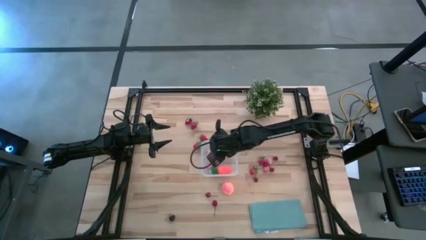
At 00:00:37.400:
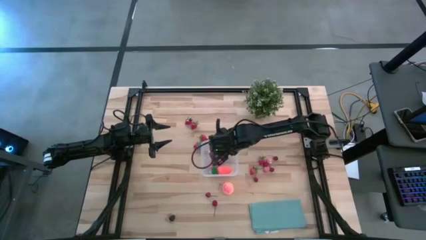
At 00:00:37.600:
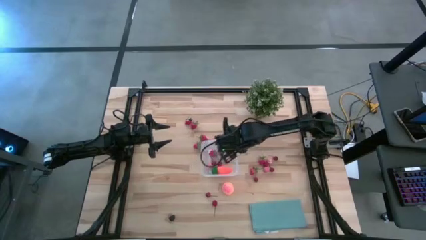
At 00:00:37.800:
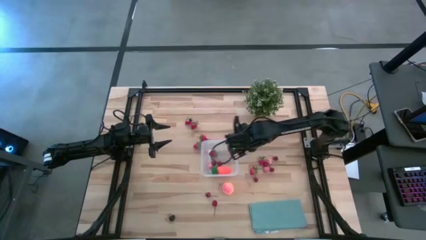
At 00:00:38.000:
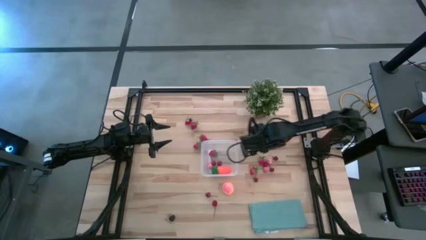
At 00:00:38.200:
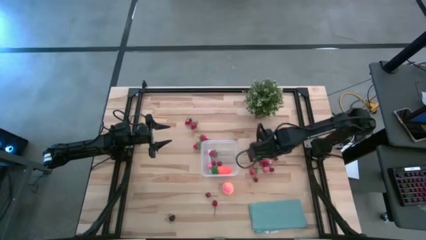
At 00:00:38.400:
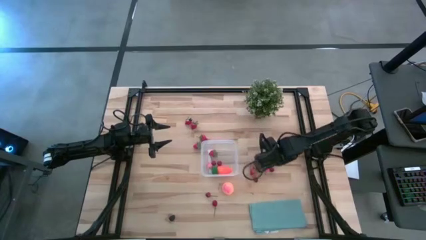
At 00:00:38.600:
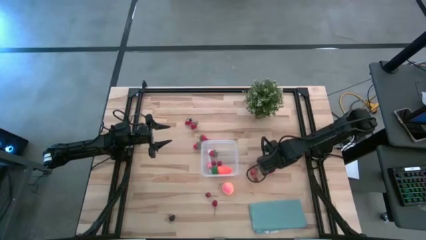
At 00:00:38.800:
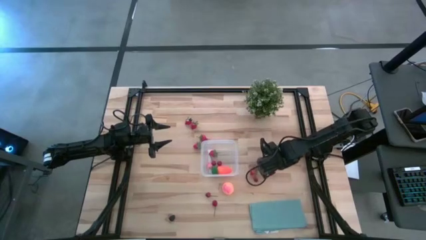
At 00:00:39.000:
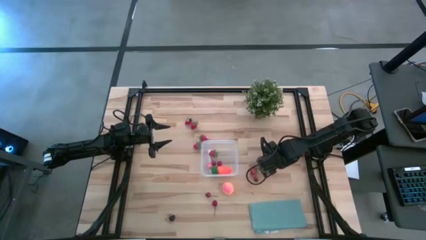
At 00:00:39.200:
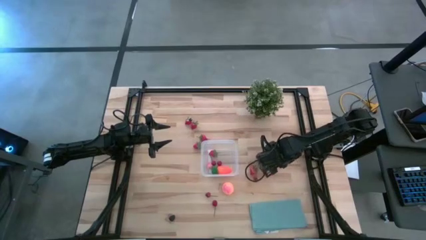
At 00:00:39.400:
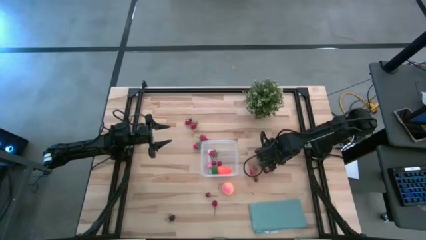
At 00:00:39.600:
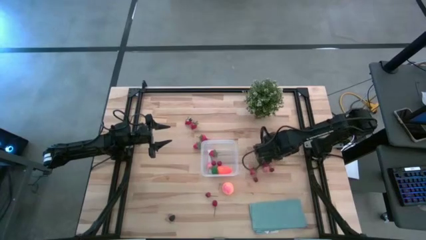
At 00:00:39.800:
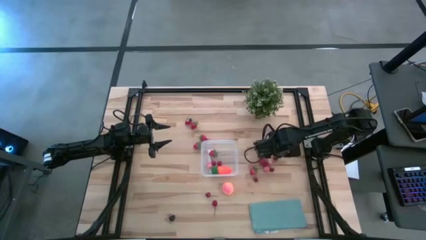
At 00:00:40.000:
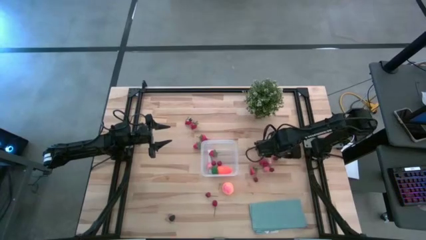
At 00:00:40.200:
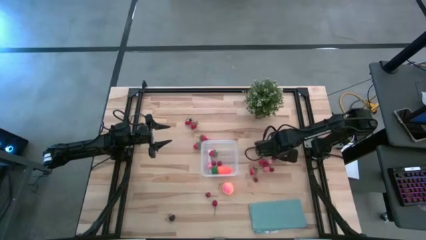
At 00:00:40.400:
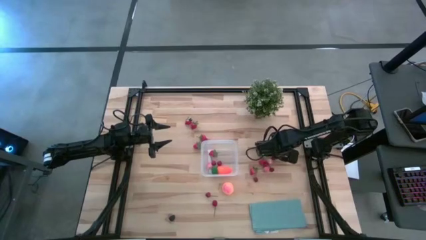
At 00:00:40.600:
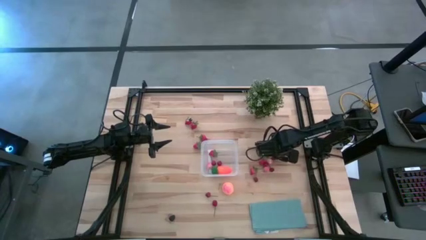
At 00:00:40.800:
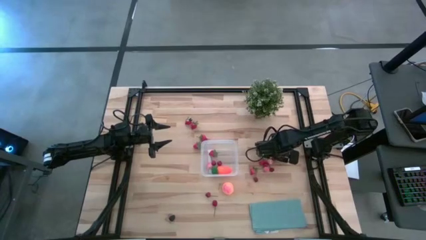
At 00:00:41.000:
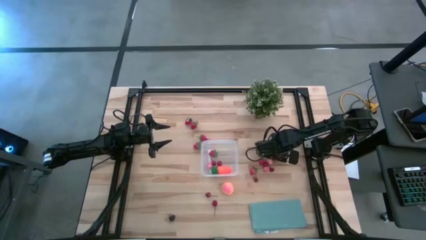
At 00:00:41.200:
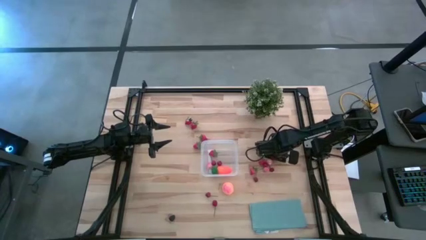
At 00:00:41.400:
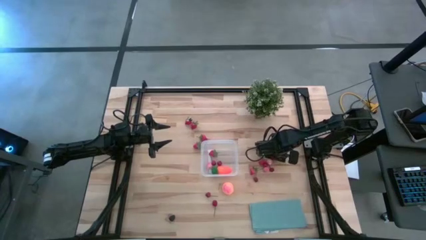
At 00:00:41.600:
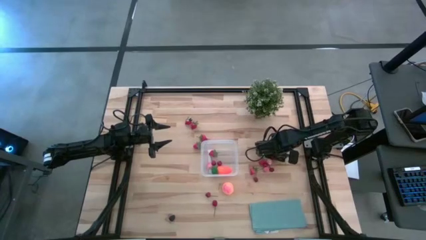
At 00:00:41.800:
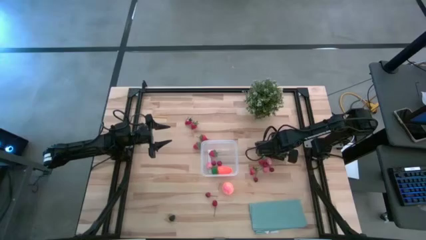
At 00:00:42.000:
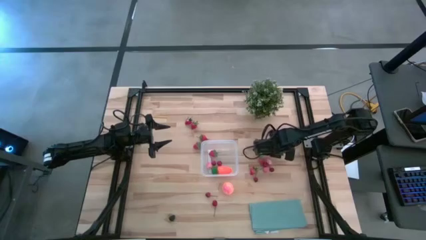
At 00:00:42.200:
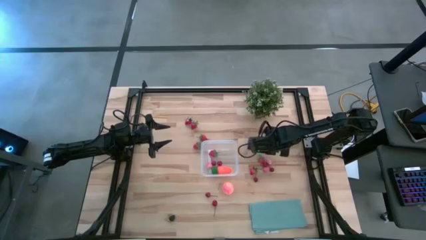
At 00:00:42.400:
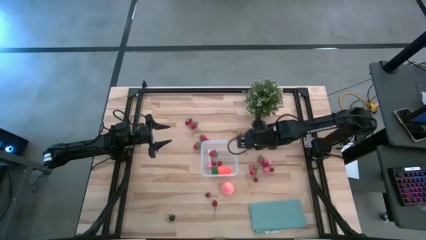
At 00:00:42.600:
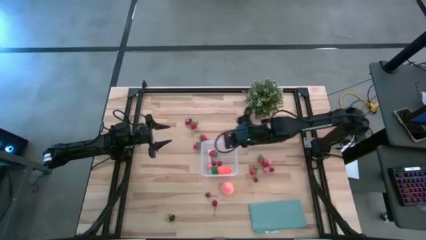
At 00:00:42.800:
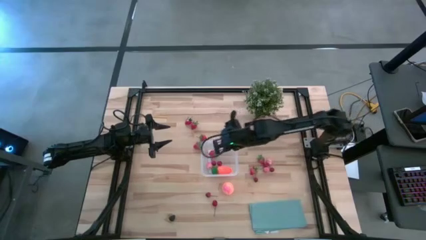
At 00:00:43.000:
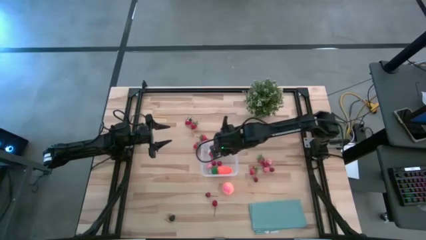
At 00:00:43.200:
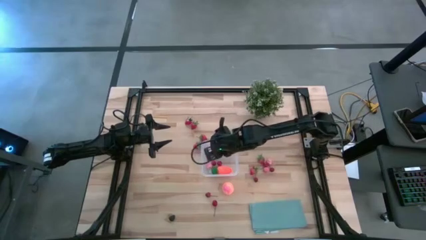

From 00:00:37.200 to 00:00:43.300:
Task: Pick and placing Produce into tupperware
Put the cherry into the transparent bin

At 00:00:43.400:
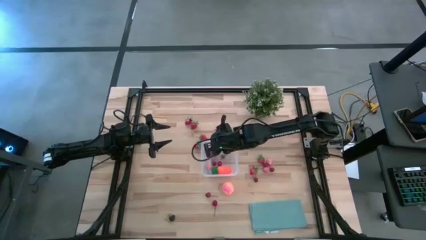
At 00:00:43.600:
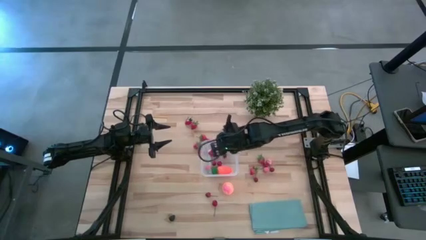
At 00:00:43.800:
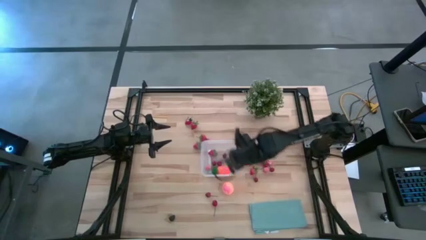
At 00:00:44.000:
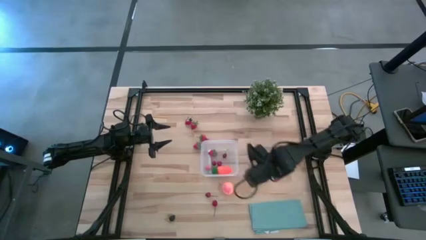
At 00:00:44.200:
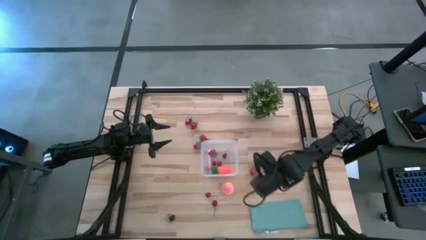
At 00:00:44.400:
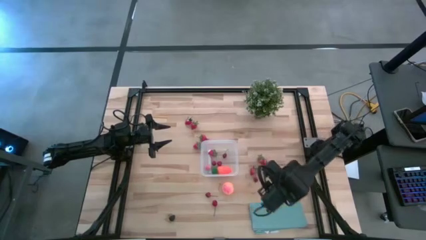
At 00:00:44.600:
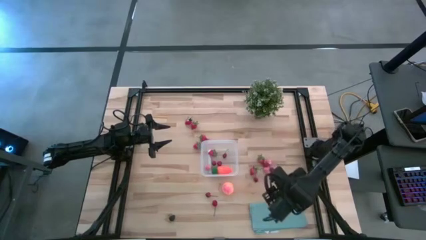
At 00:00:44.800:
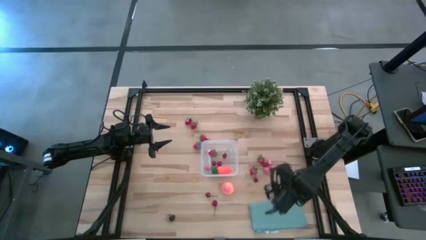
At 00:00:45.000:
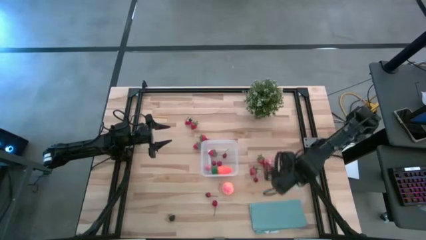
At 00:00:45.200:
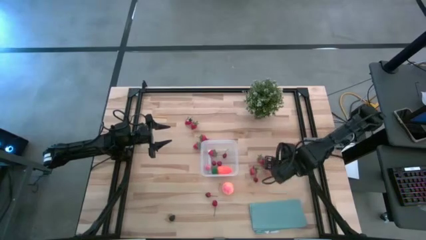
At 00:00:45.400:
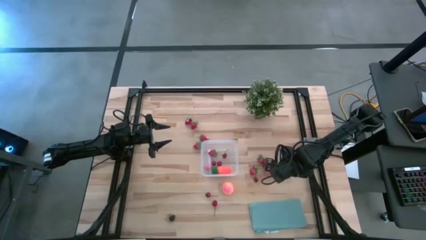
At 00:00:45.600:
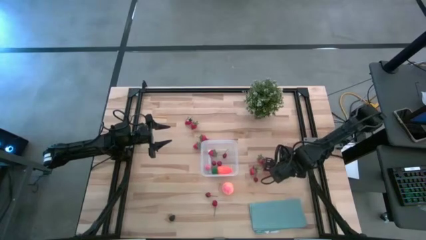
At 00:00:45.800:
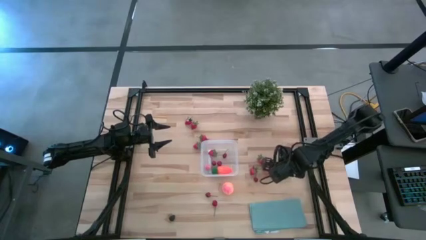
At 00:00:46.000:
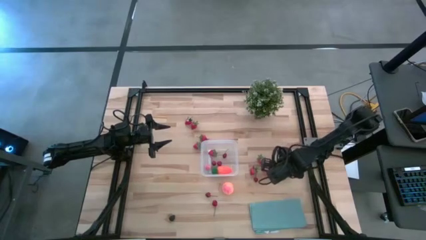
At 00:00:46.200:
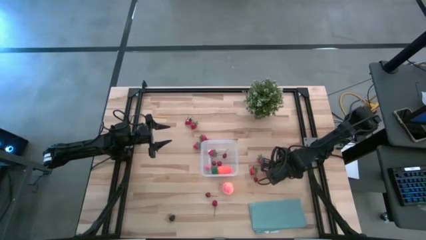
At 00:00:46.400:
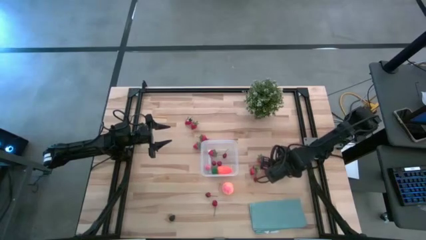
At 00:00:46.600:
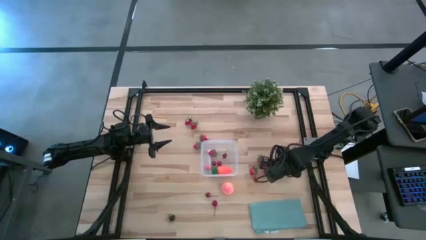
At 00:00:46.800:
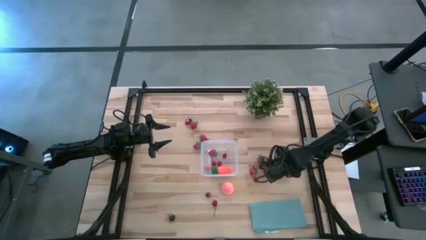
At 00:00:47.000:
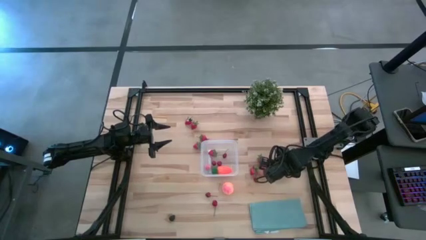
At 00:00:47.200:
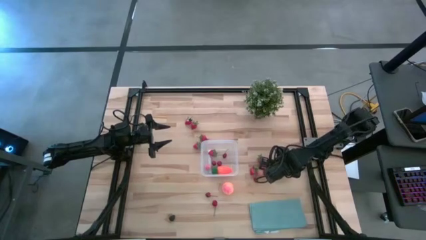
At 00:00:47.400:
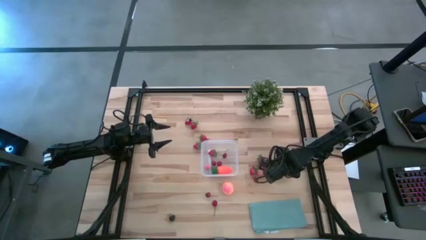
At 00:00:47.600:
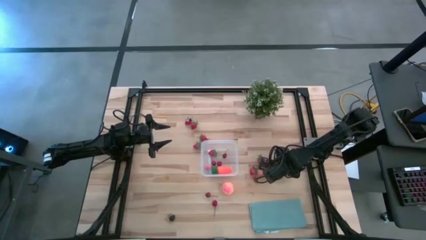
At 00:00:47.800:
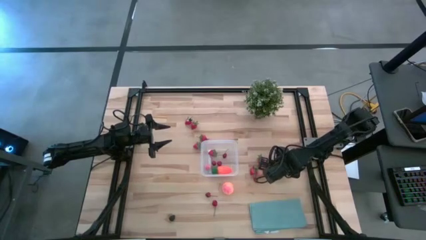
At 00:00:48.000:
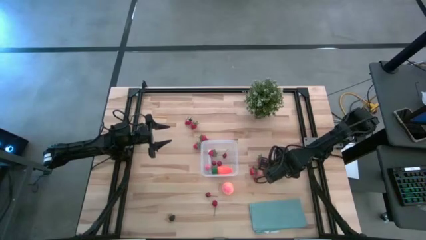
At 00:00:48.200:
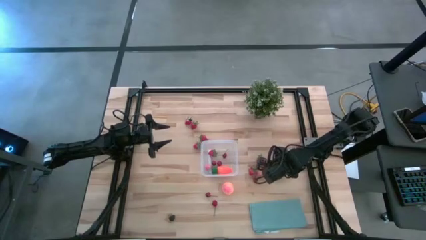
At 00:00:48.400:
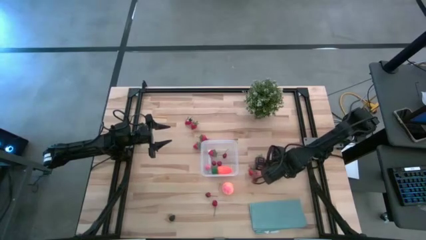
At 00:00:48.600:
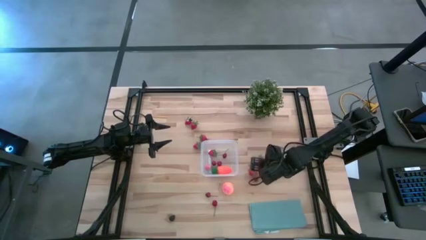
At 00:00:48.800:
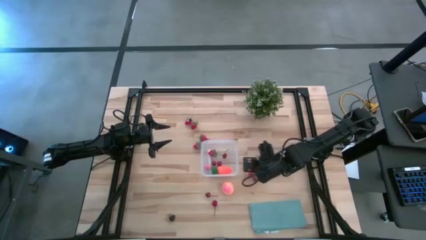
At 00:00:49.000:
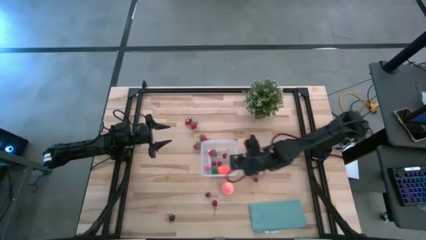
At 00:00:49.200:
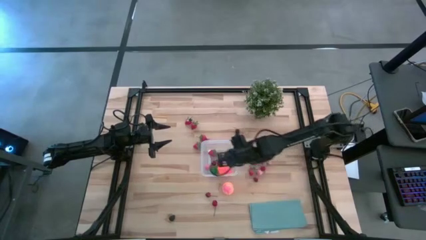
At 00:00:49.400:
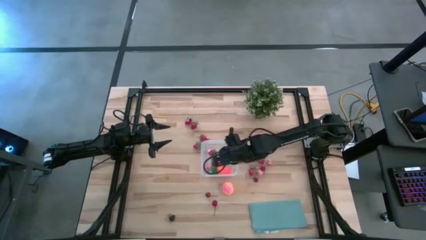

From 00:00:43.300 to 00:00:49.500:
Put the cherry into the transparent bin

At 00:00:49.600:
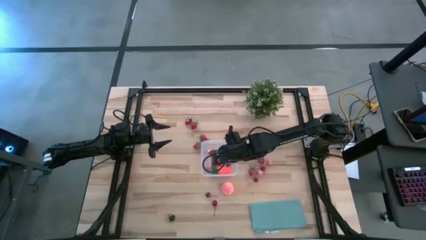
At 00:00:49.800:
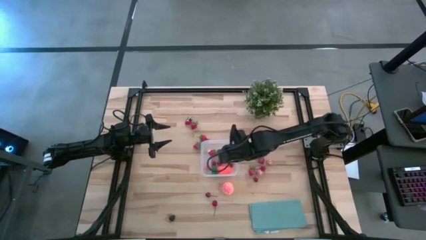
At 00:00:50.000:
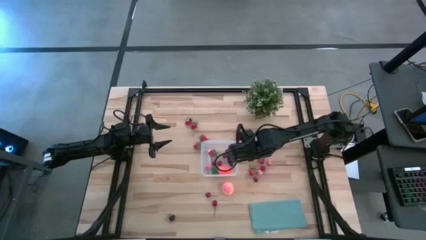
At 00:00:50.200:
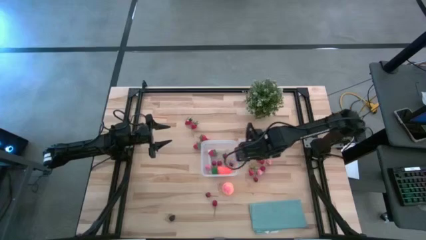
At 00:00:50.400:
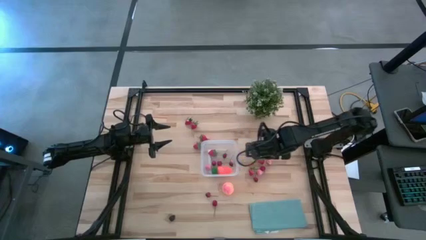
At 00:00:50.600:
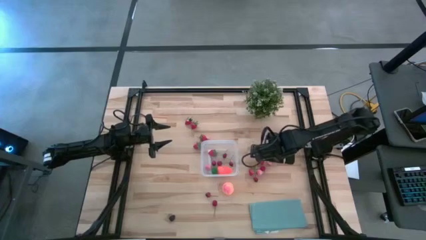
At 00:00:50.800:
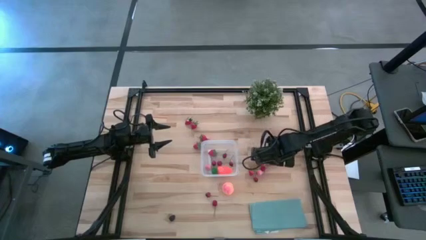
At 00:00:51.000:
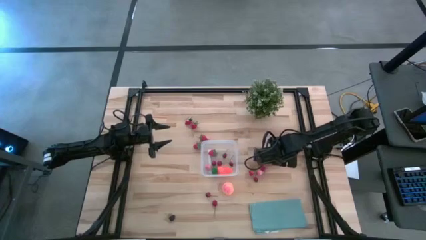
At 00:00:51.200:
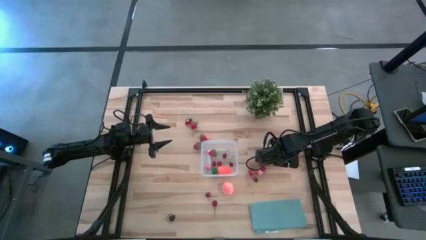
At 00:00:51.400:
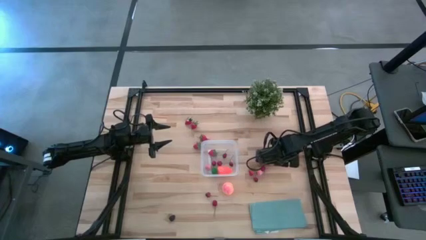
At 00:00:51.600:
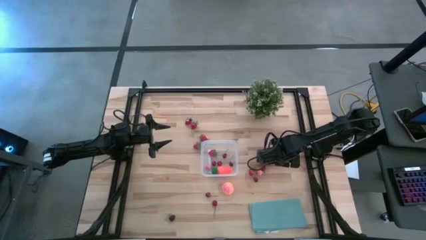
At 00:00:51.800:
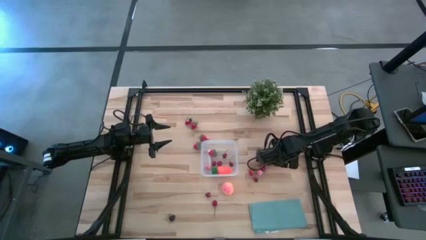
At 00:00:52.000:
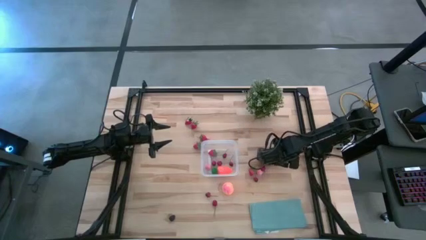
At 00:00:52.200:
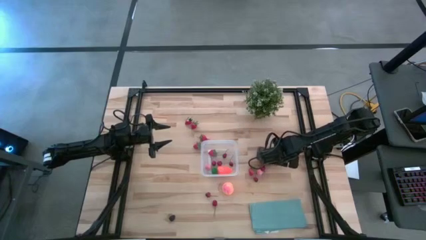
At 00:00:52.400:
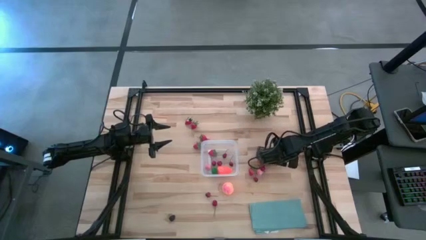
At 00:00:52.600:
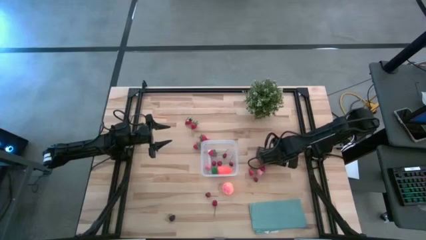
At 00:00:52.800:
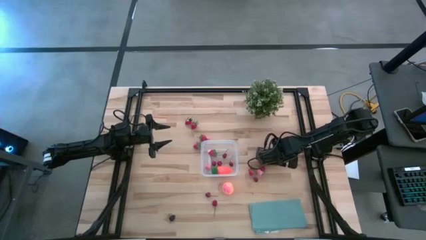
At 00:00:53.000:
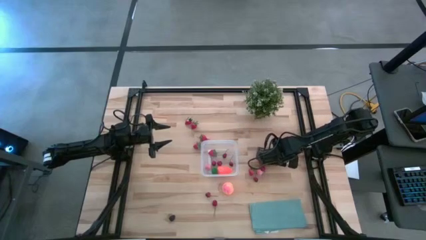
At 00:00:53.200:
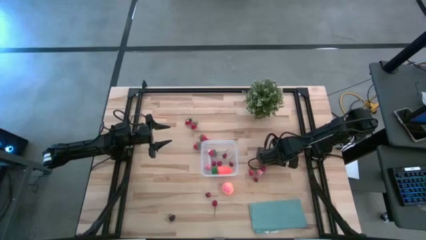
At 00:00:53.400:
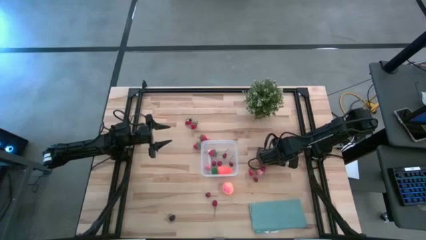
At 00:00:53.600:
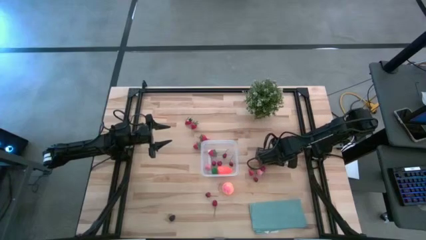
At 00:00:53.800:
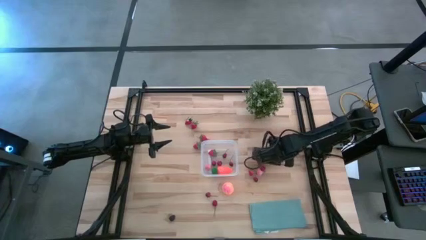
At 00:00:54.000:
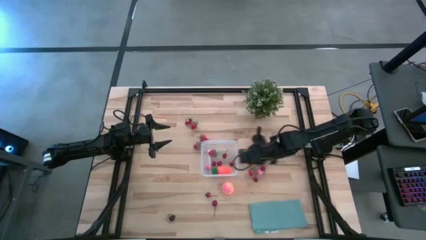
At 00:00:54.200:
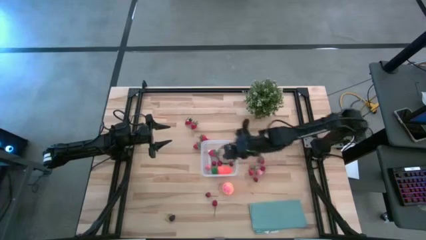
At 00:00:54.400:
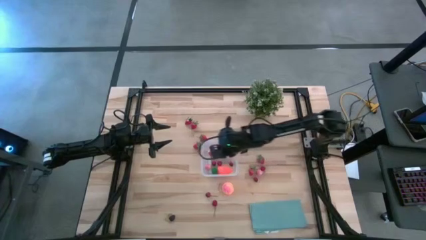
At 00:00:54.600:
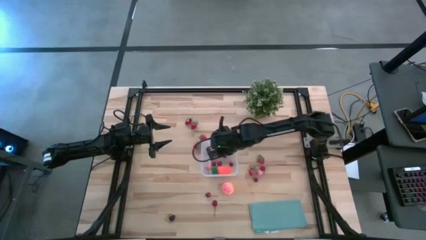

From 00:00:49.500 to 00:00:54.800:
Put the peach into the transparent bin
